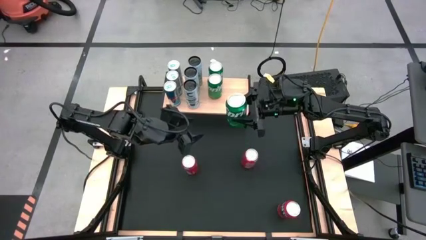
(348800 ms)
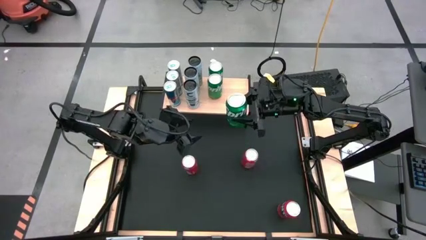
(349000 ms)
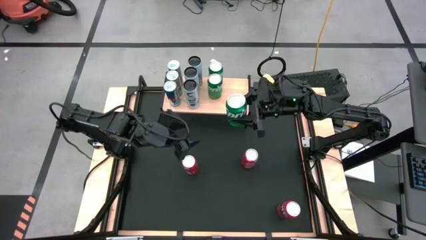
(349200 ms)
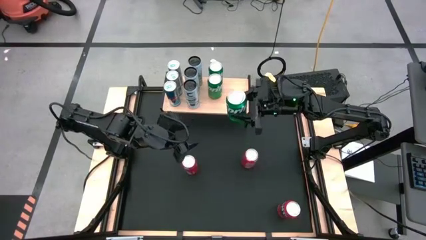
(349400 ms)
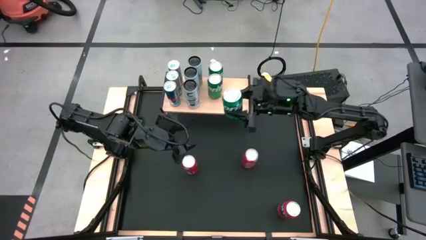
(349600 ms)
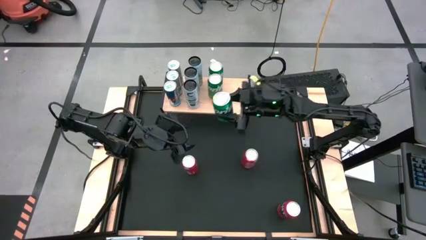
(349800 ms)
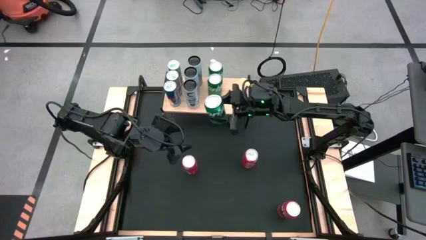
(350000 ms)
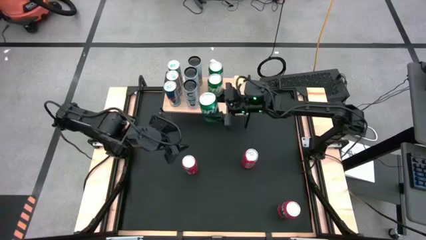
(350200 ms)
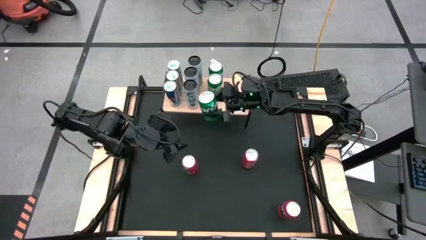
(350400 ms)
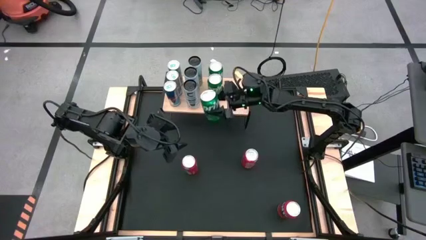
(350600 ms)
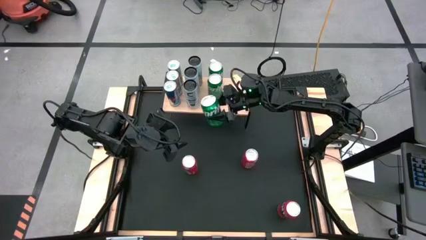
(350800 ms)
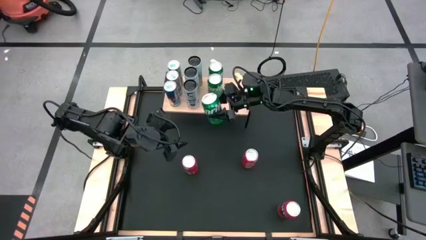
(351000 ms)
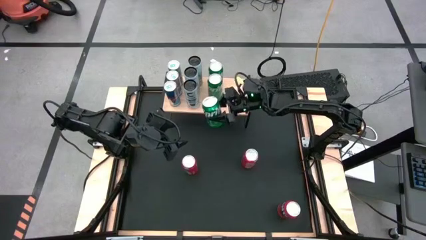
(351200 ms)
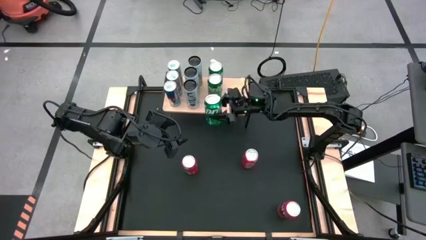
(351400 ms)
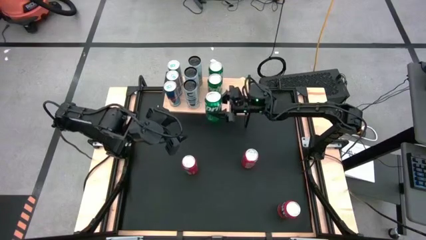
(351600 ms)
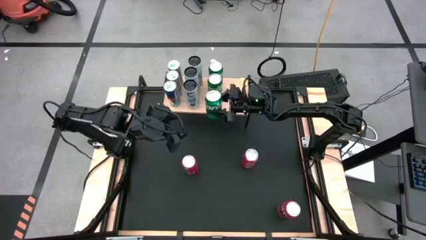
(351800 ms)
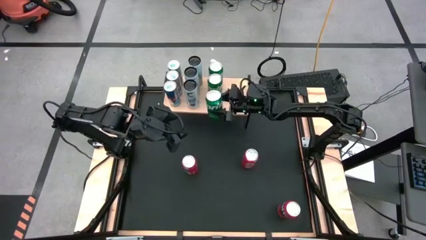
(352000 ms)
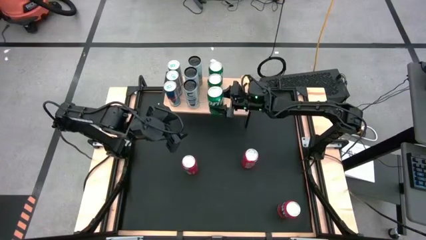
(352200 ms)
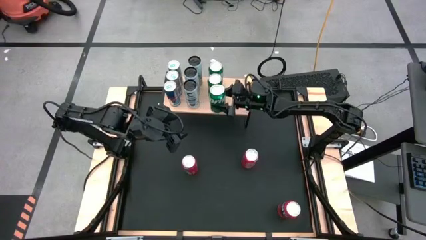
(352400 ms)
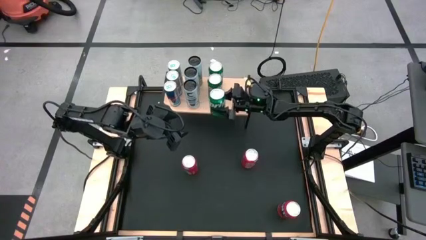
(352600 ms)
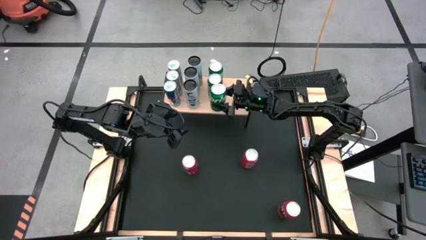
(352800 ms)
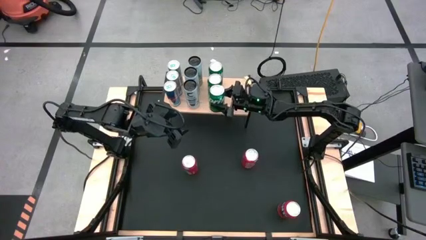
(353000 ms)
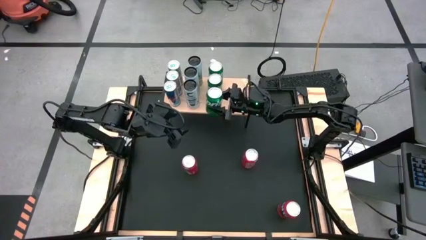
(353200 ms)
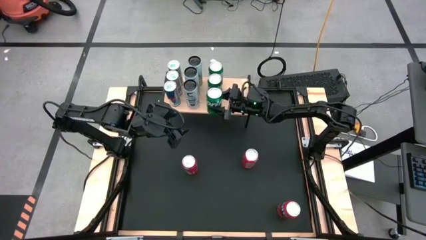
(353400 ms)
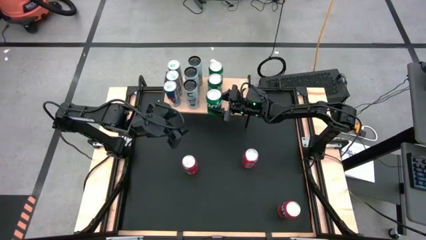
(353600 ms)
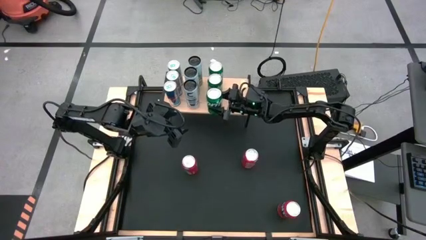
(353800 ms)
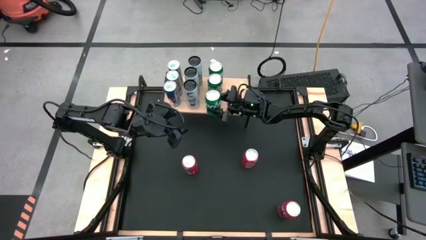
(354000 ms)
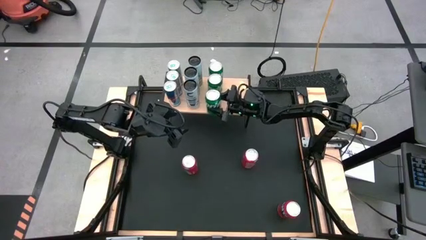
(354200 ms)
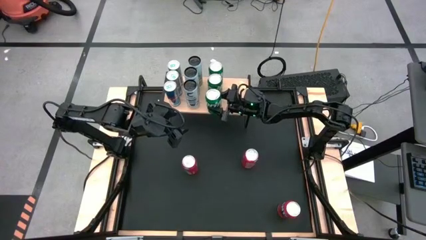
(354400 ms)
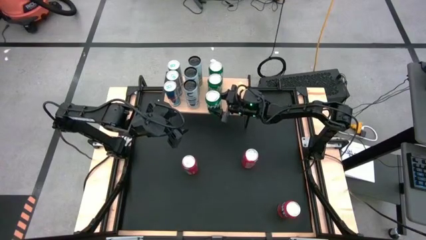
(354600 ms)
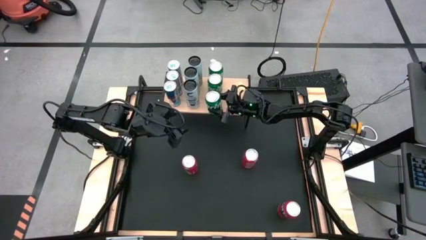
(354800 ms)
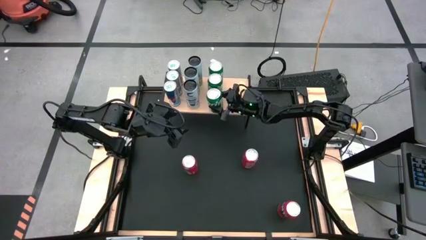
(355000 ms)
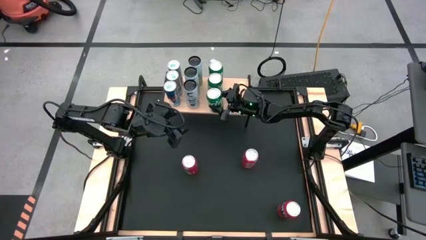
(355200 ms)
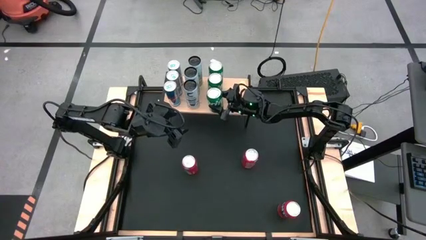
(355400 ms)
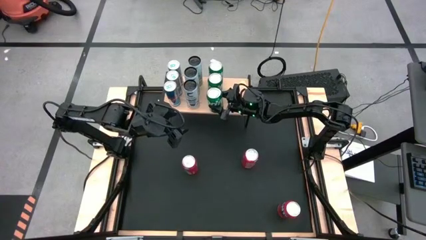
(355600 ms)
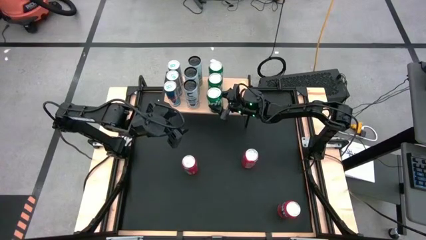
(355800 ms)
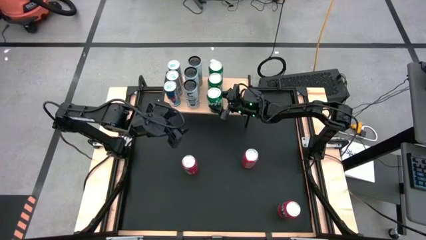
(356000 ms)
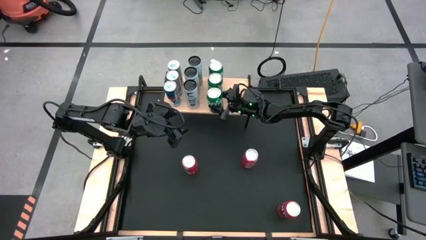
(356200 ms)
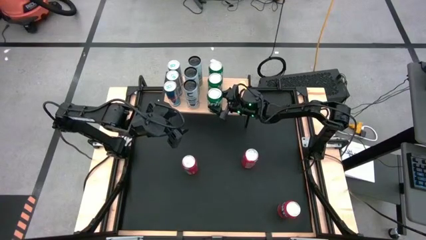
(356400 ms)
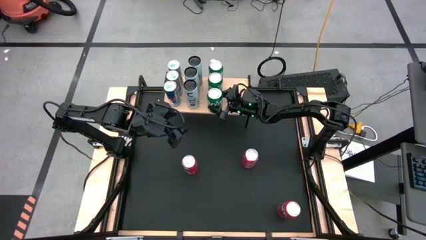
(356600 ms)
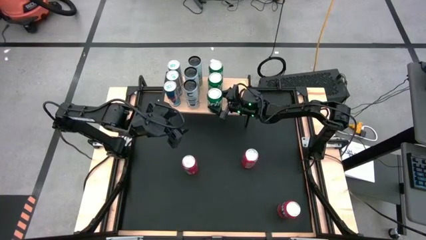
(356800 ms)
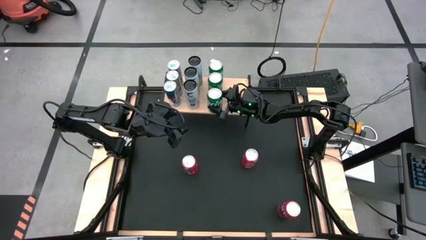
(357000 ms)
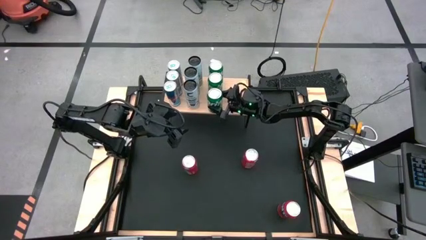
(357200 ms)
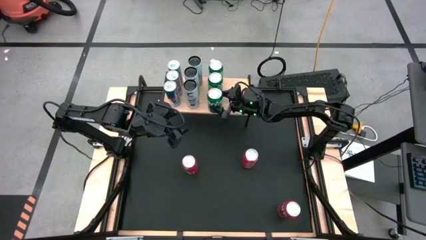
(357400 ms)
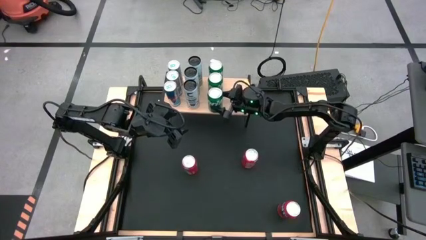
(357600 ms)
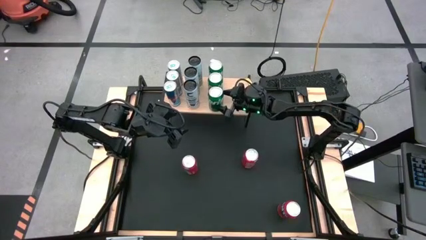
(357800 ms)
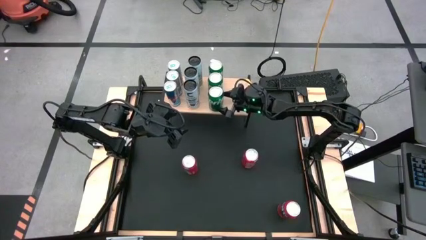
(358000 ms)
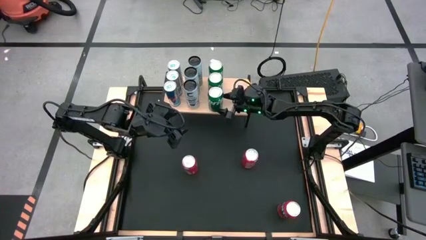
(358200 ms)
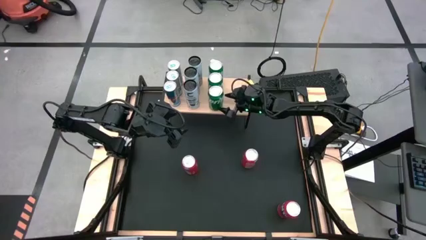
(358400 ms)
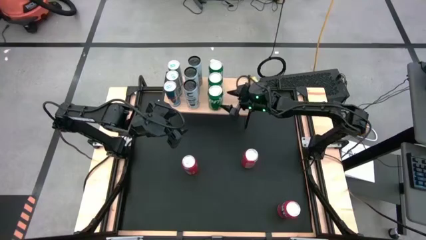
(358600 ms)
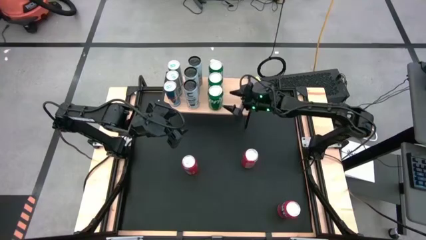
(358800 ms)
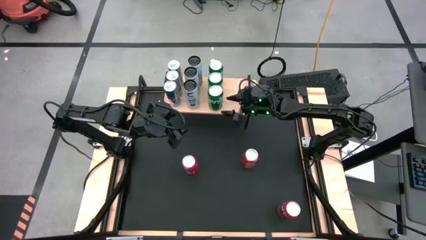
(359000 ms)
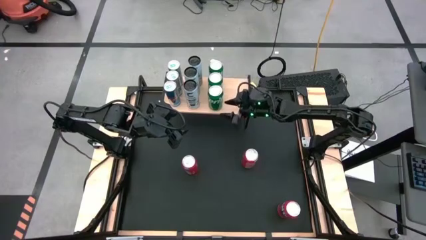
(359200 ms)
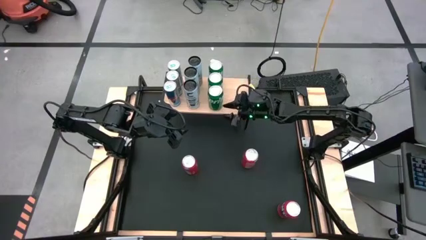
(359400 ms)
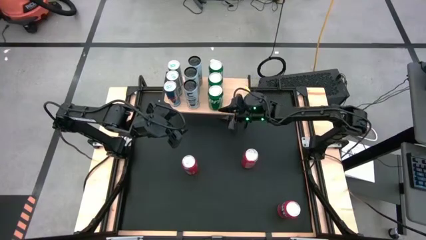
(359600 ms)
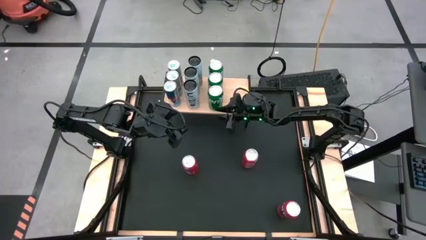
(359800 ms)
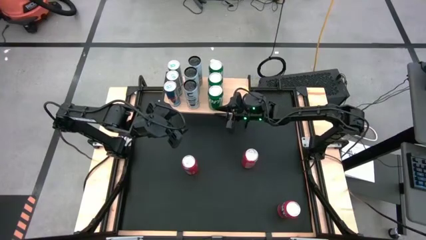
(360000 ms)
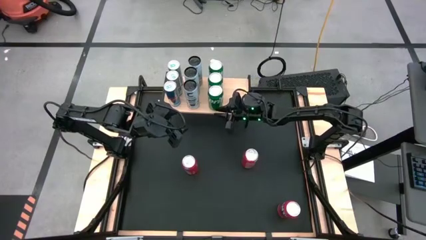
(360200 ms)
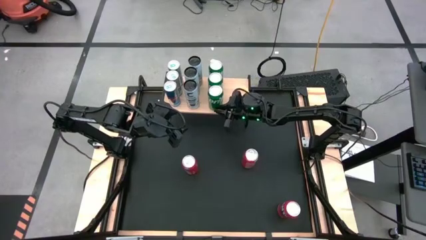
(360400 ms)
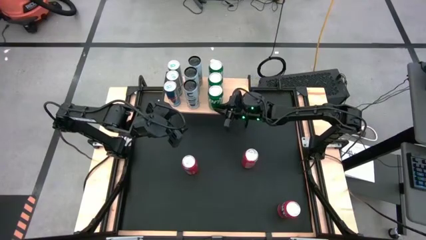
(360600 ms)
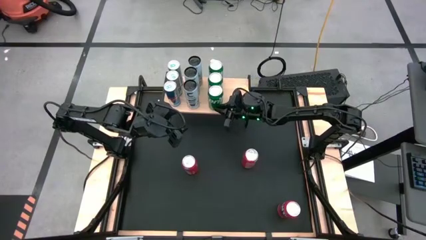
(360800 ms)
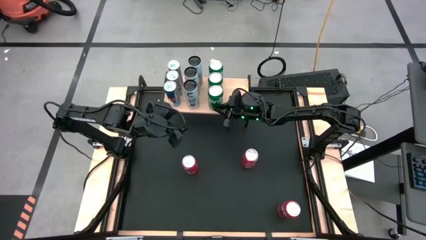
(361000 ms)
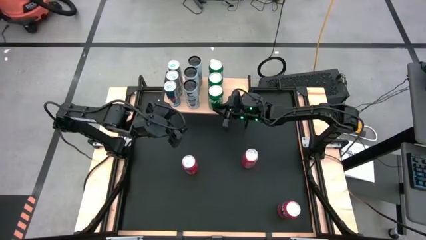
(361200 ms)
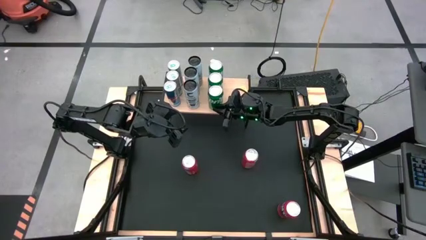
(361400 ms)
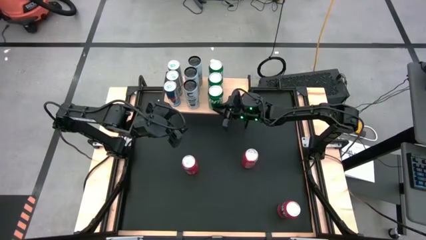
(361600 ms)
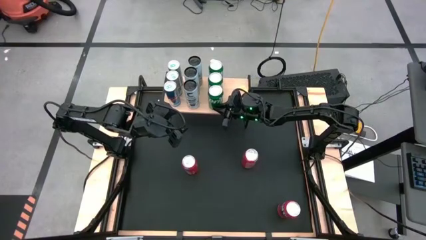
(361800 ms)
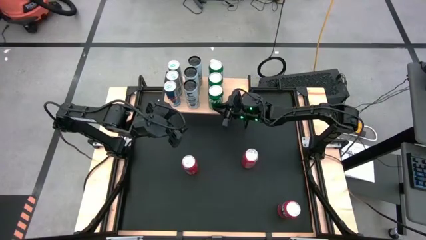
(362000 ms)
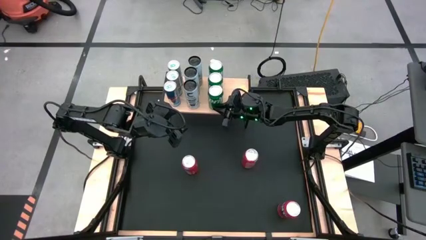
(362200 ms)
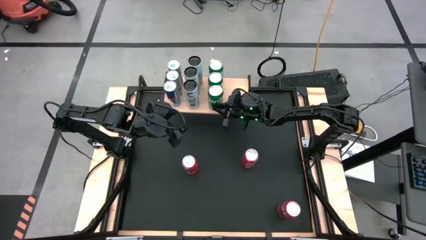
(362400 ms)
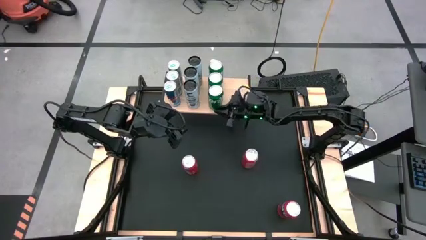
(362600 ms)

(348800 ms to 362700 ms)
Task: Place canned beverage on shelf
Put the green soda can on the shelf

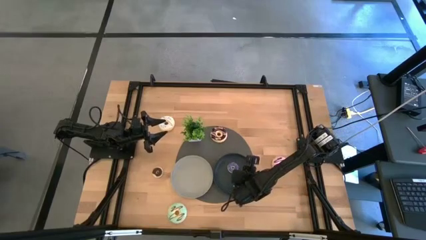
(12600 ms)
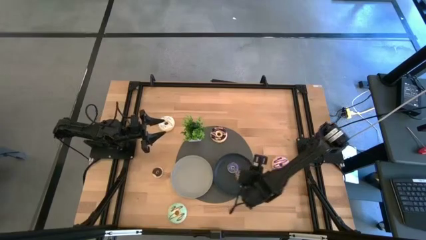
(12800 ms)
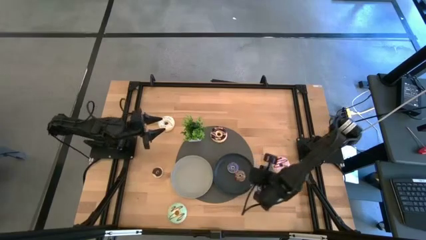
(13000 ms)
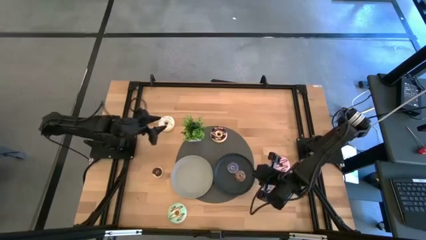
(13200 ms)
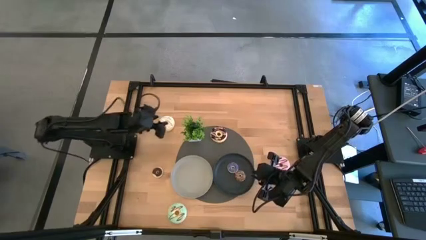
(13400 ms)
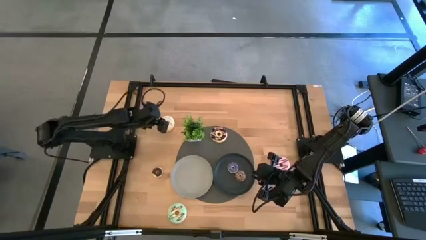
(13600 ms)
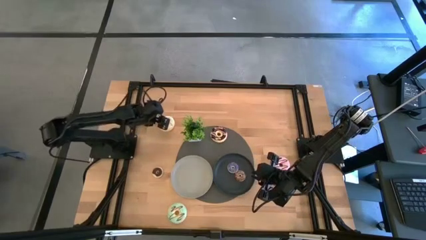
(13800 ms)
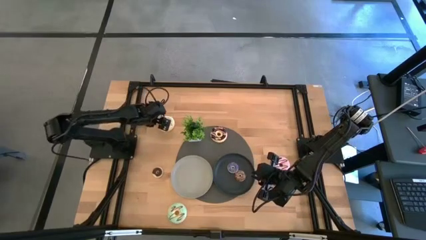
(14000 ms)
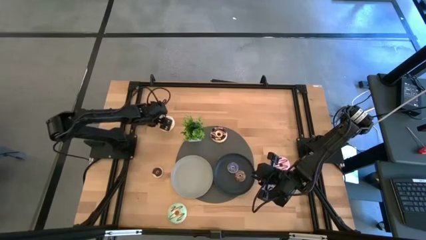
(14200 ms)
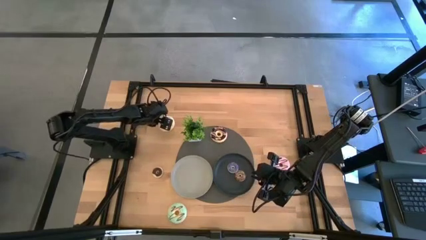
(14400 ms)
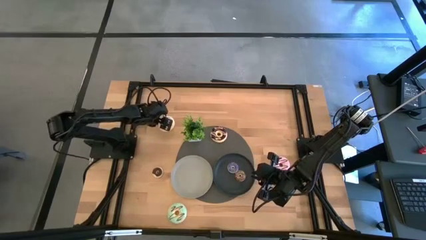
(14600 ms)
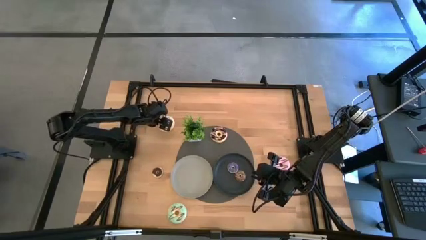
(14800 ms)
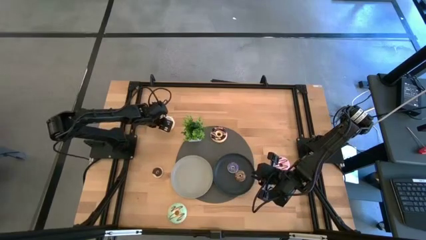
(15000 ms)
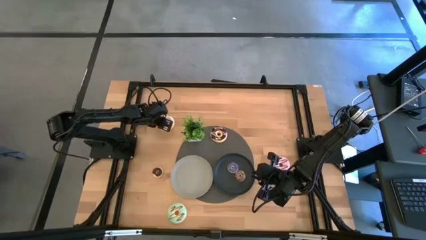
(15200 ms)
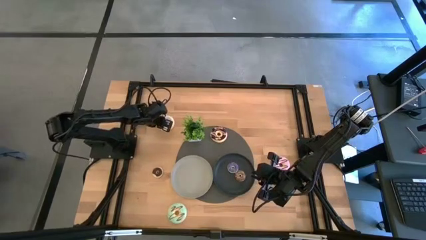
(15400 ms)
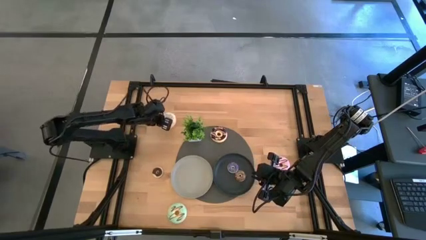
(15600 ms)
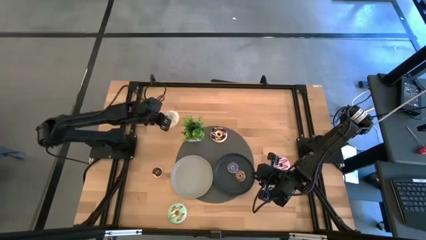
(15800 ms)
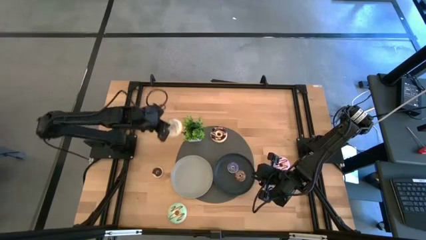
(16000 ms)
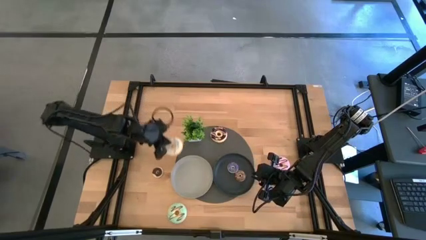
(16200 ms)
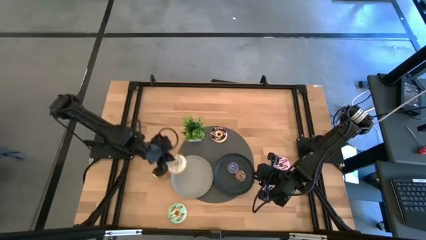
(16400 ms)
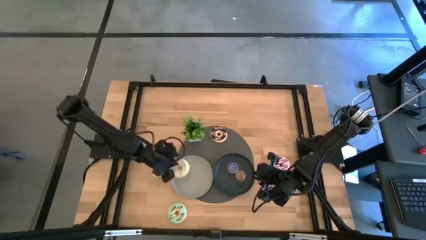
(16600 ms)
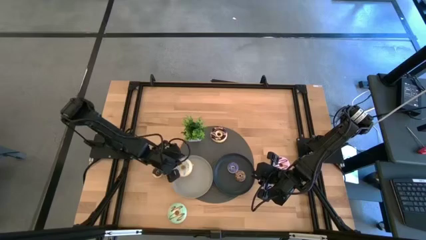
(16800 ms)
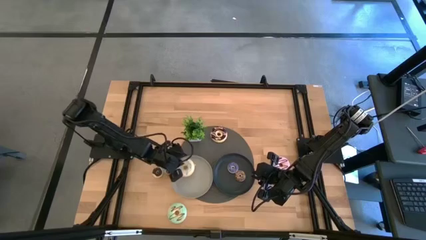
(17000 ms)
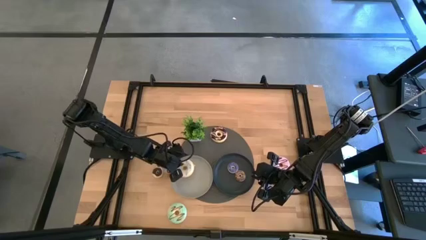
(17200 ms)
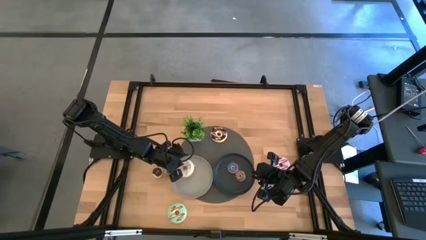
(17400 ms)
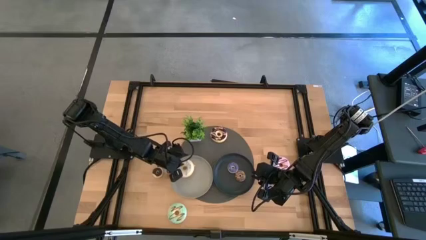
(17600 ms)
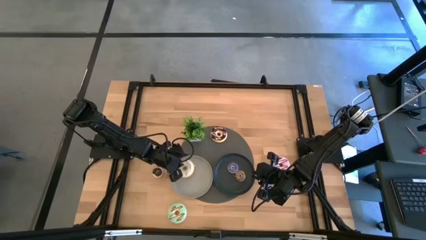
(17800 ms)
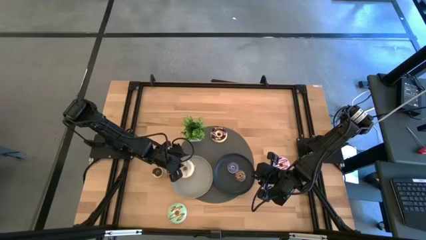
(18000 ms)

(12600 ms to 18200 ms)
Task: Pick & Place donuts
Put the large white donut on the gray plate
